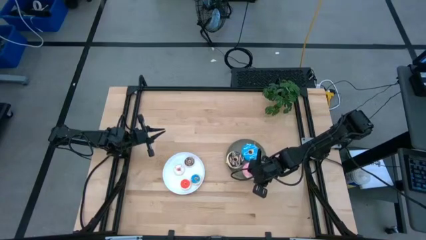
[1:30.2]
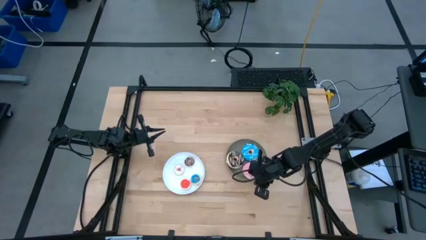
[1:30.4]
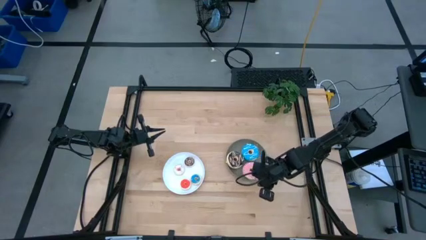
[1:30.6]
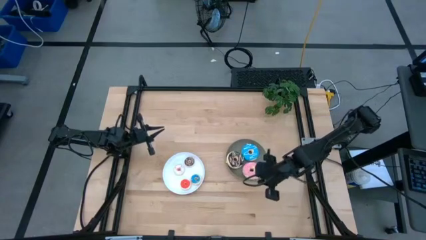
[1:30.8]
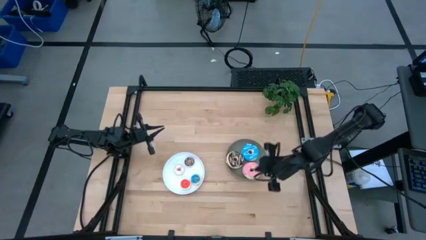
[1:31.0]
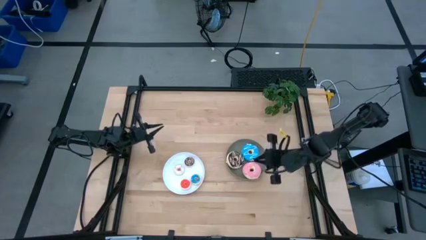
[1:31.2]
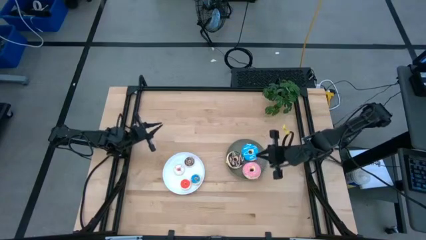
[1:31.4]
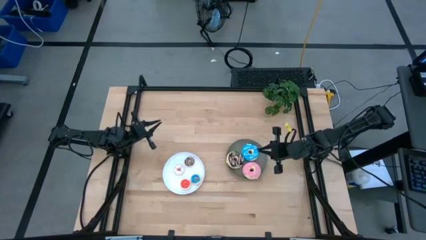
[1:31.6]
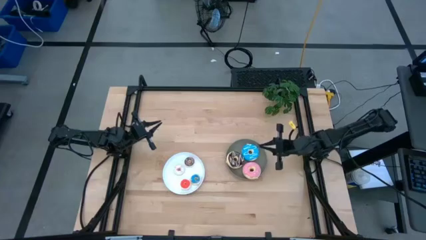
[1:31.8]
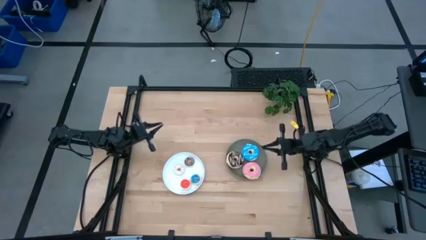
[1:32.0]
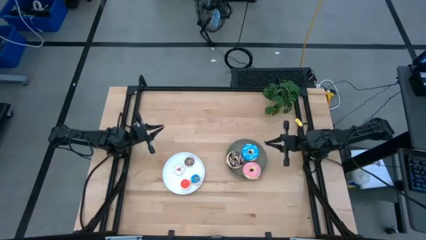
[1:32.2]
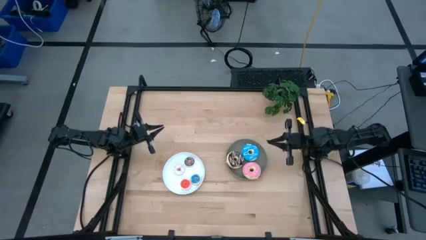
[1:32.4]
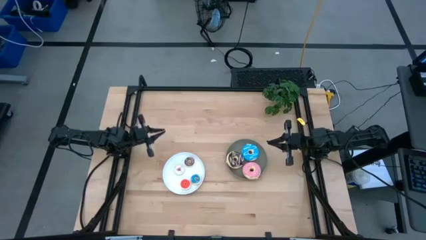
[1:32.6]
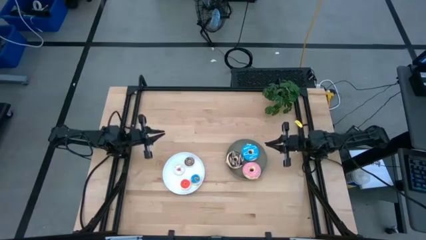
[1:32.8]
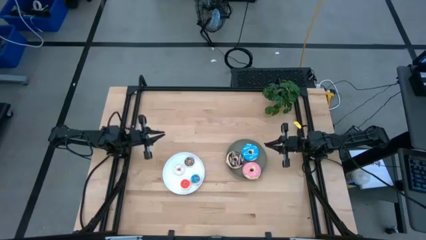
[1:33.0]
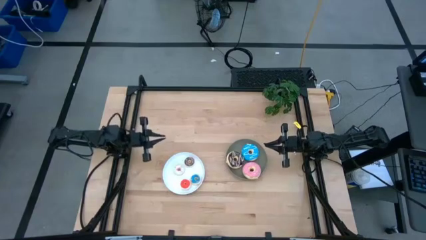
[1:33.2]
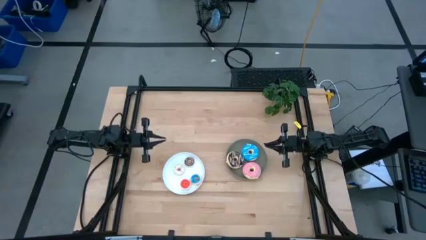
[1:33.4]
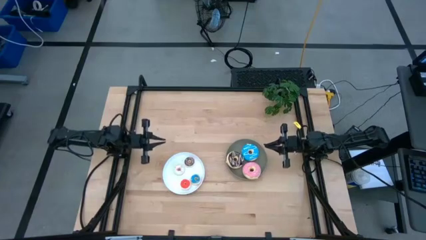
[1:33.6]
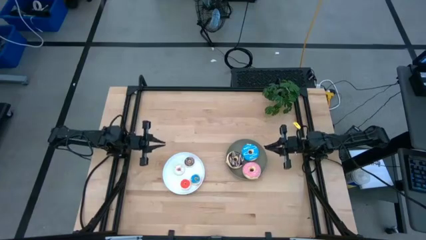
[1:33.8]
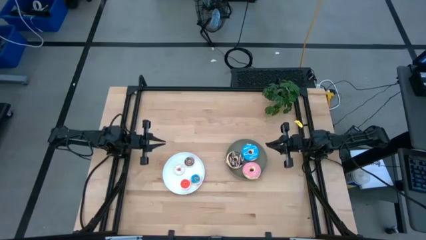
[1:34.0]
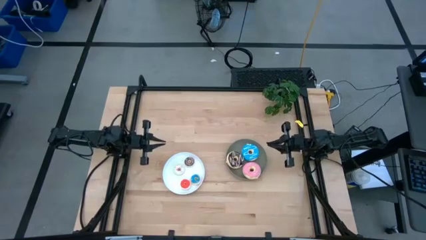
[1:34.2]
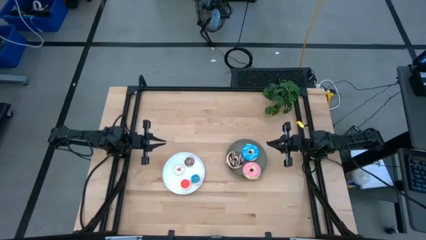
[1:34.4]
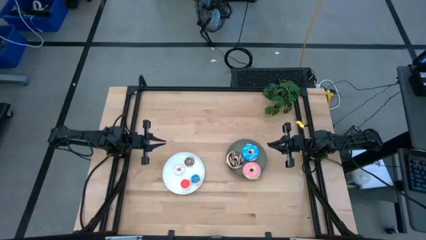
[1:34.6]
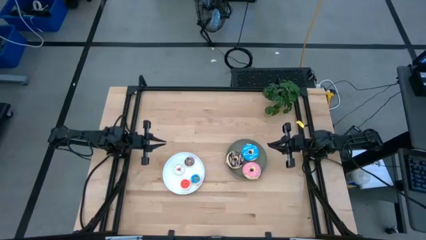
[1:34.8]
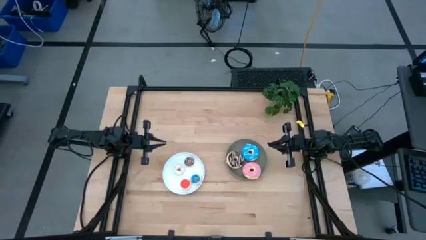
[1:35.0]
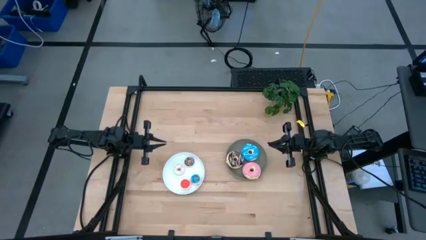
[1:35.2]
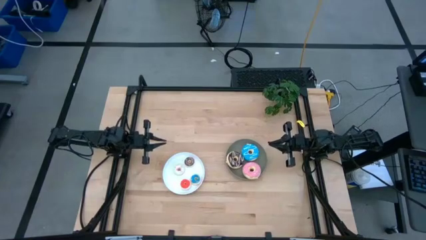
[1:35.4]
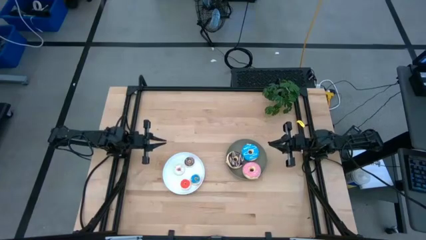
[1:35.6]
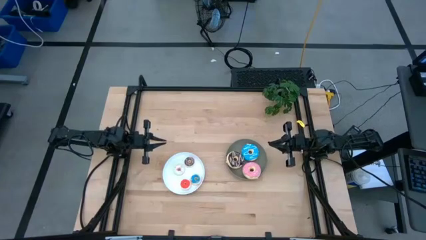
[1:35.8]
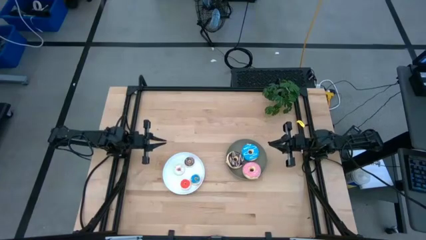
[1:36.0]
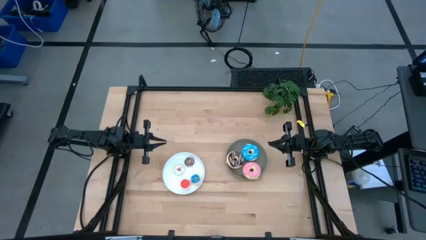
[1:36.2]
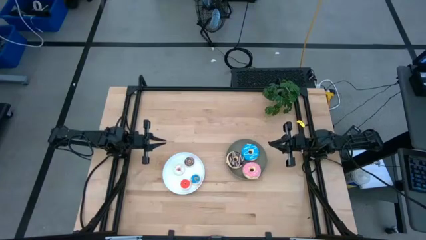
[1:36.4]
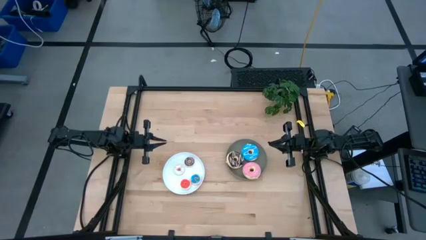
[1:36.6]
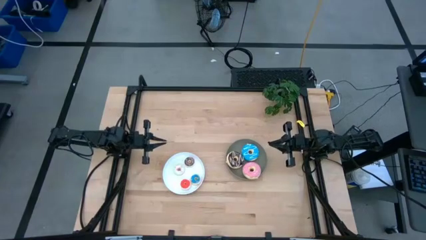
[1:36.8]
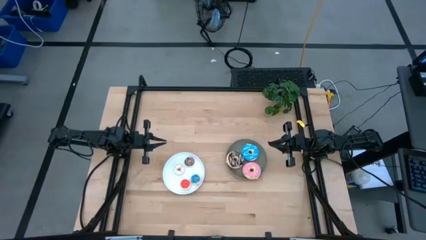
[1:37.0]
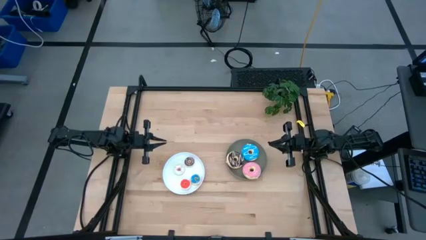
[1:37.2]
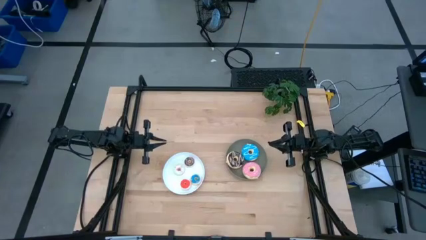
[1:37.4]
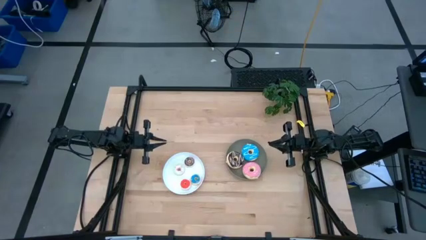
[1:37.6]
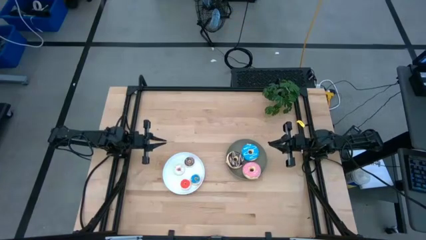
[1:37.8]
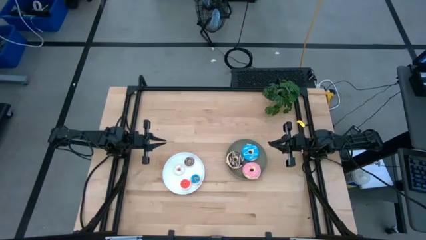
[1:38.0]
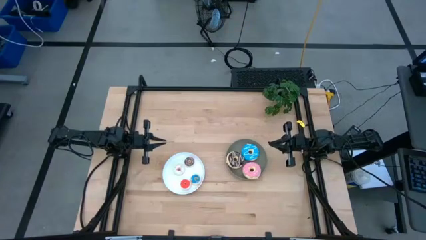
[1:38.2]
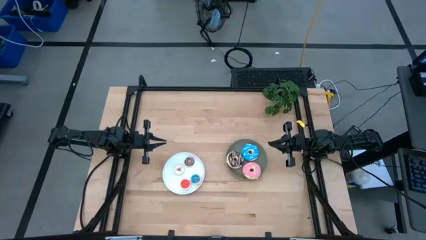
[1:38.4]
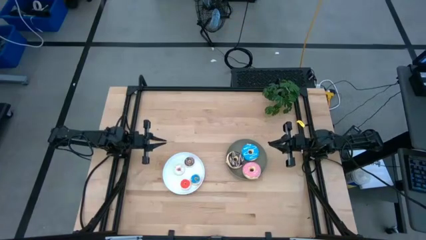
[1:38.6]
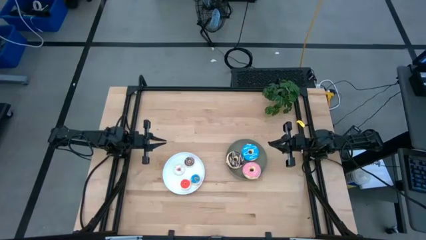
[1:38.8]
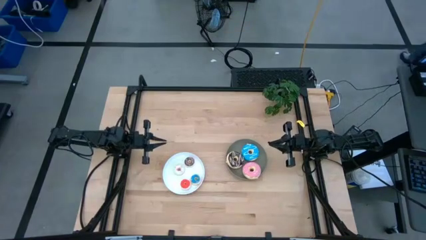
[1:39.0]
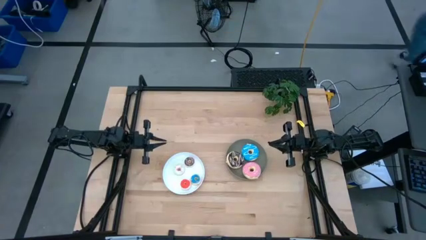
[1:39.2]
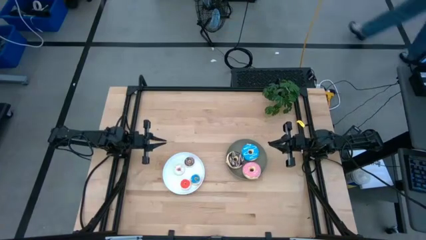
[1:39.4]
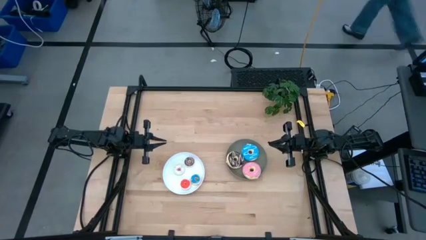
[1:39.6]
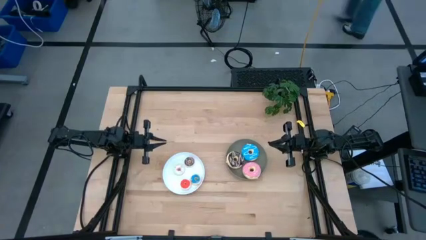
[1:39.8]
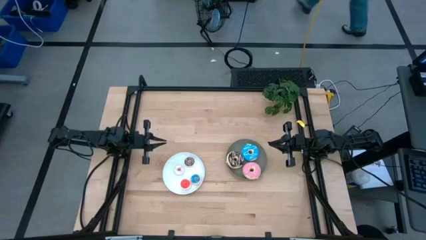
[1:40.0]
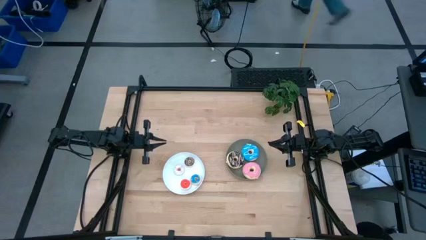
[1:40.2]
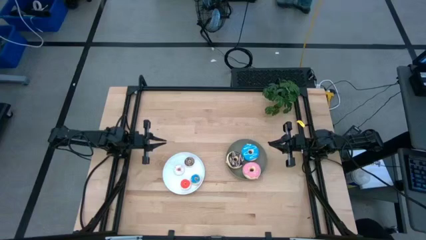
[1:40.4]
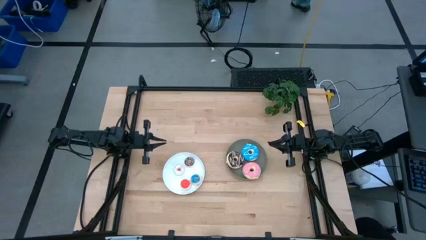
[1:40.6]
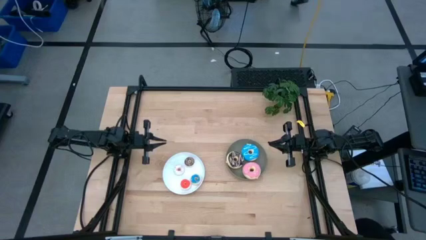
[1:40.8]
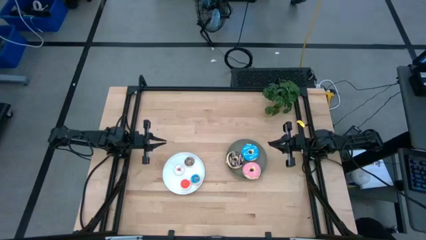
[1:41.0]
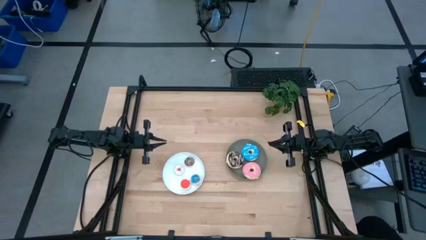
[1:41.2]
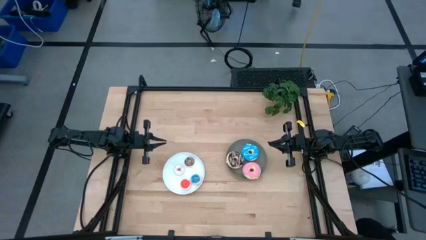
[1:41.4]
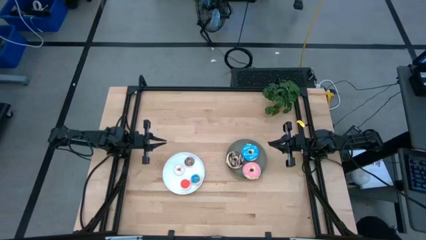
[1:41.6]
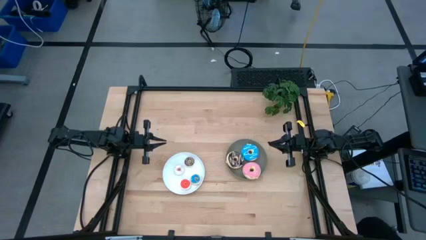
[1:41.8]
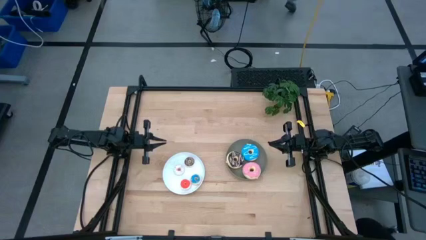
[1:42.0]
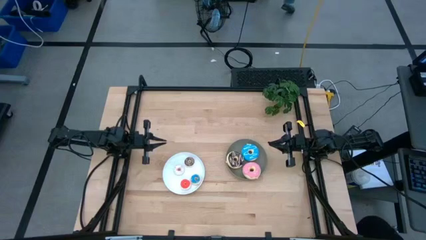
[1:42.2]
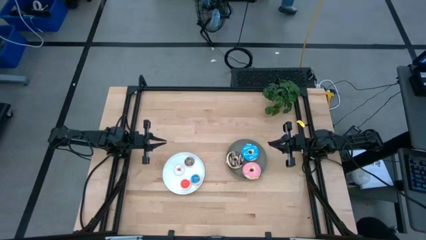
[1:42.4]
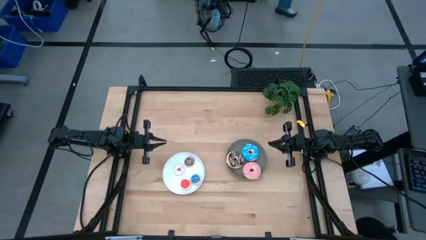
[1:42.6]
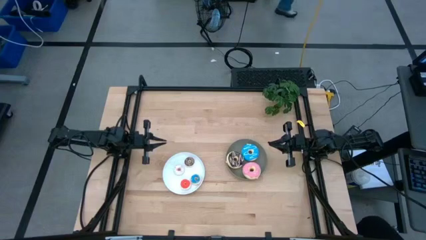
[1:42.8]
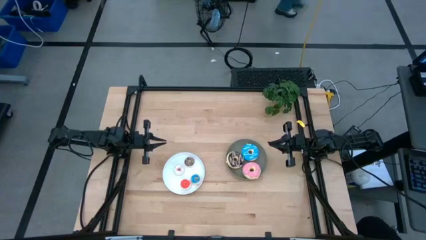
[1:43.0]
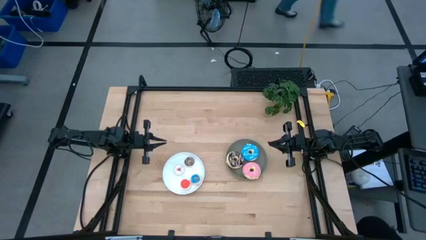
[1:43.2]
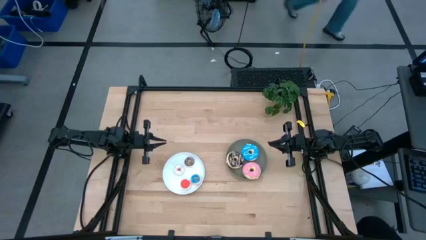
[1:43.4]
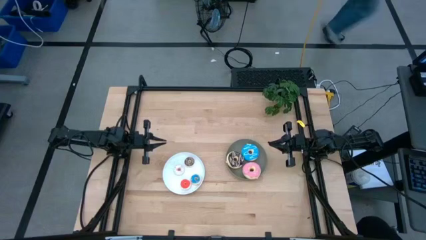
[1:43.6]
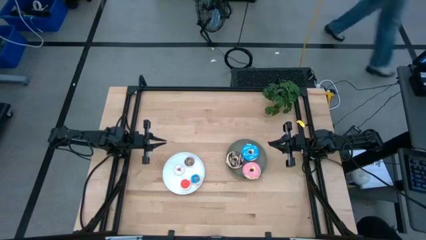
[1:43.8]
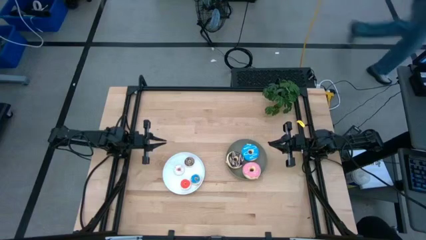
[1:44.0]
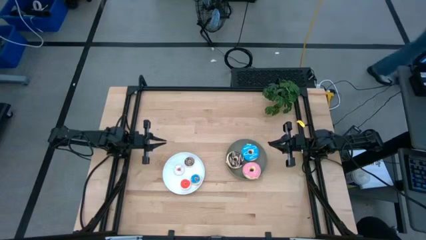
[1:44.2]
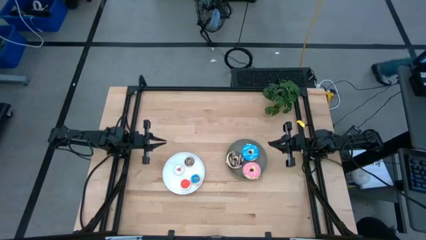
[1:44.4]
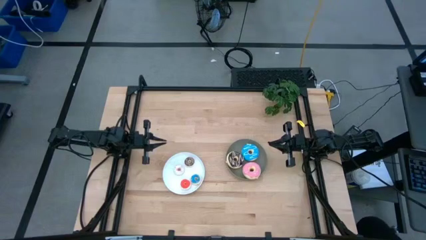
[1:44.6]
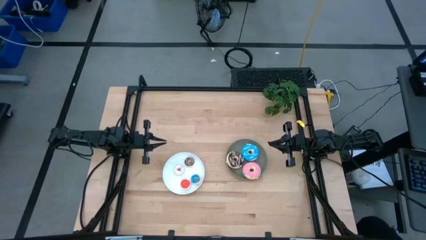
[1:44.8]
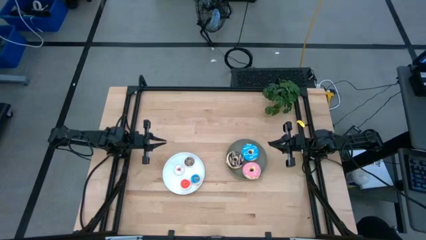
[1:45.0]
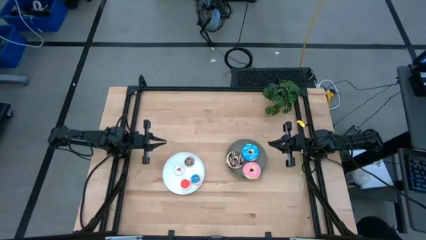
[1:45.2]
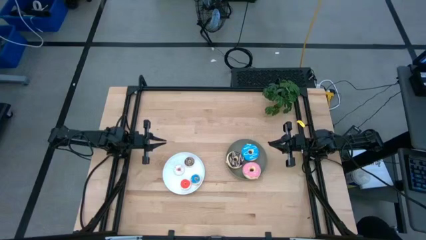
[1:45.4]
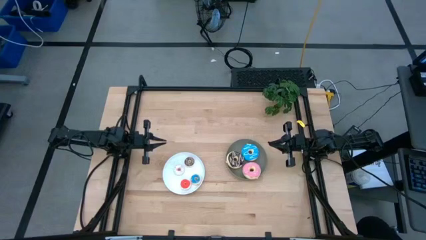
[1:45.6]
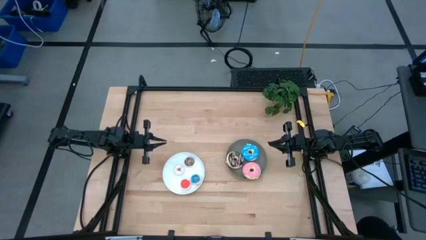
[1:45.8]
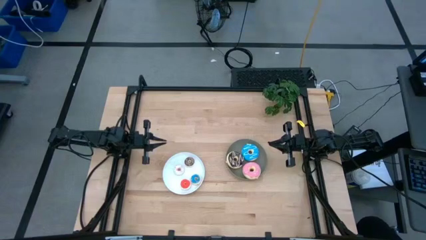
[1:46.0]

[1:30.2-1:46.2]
Task: Pick & Place donuts
Return to Home Position
